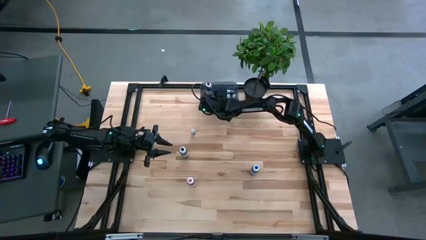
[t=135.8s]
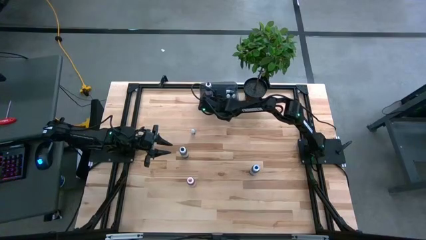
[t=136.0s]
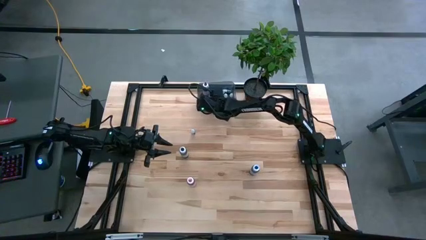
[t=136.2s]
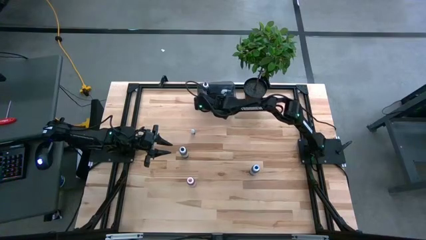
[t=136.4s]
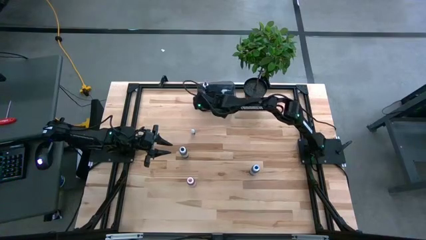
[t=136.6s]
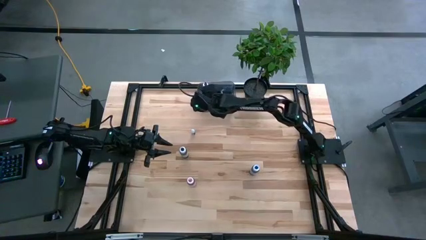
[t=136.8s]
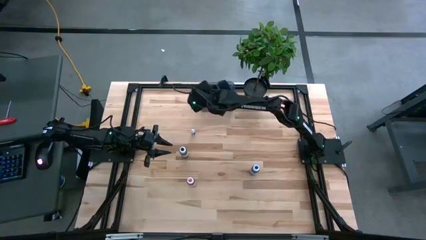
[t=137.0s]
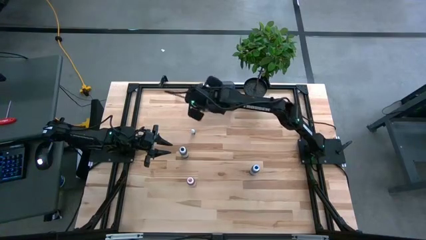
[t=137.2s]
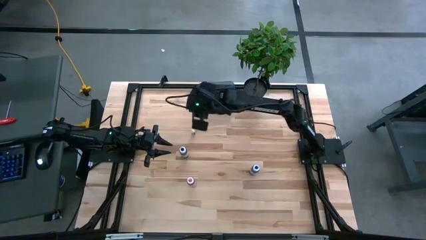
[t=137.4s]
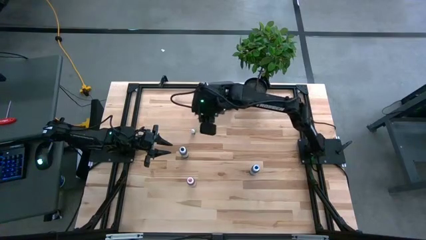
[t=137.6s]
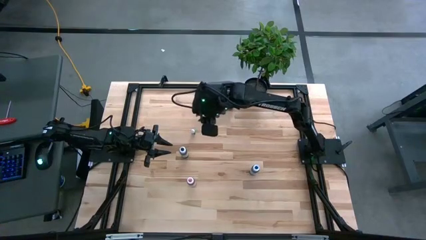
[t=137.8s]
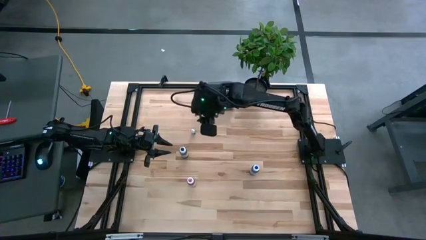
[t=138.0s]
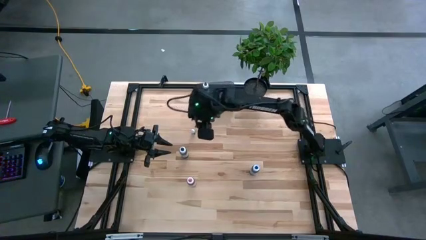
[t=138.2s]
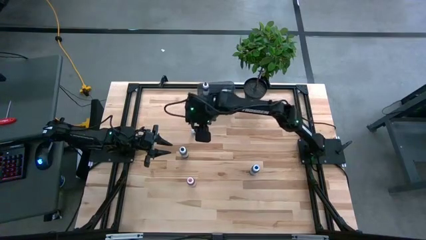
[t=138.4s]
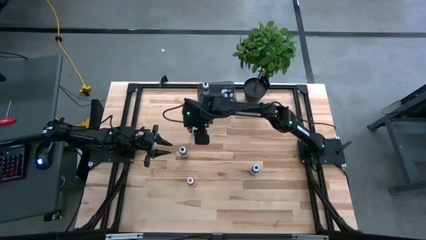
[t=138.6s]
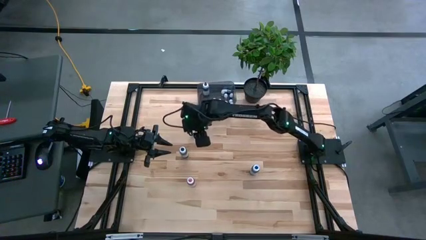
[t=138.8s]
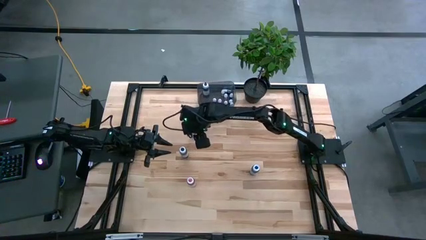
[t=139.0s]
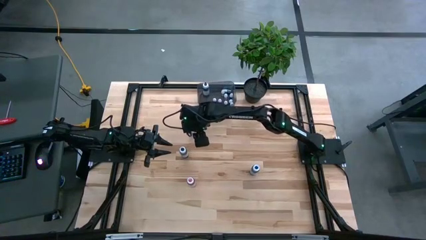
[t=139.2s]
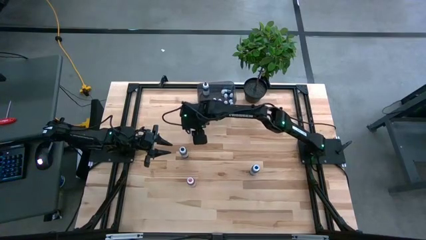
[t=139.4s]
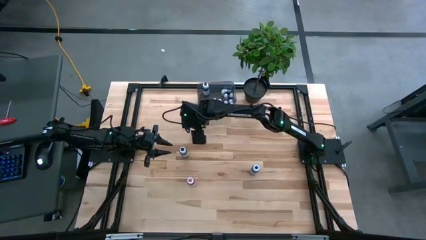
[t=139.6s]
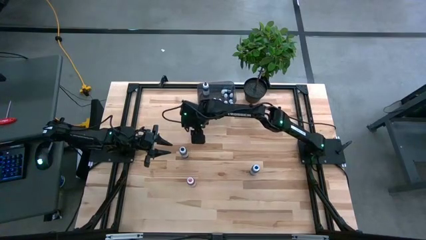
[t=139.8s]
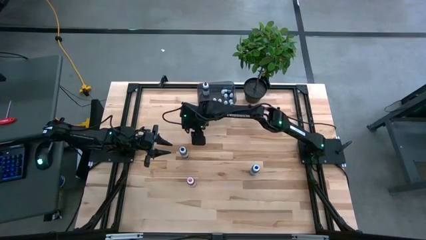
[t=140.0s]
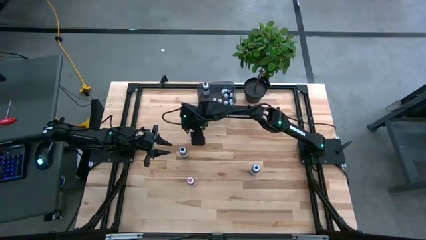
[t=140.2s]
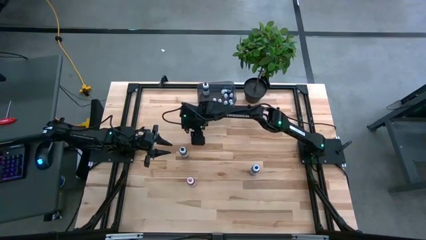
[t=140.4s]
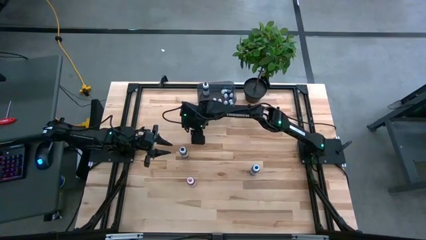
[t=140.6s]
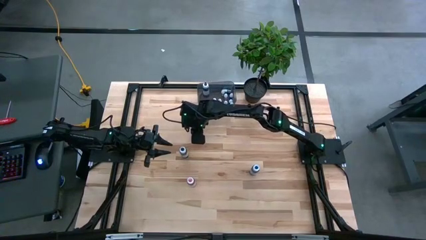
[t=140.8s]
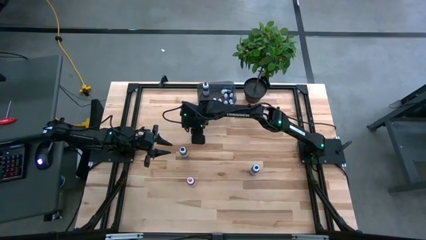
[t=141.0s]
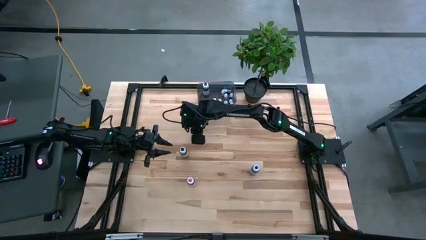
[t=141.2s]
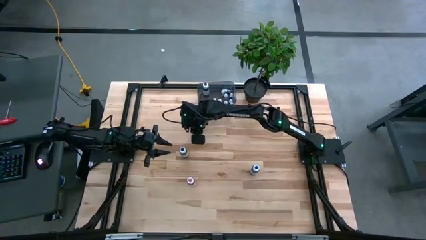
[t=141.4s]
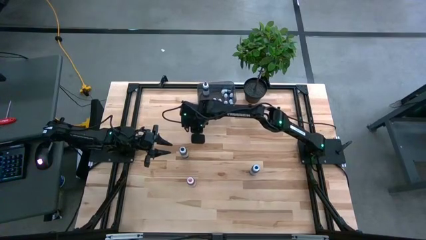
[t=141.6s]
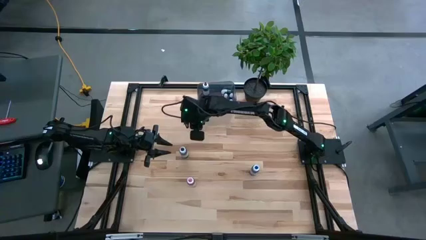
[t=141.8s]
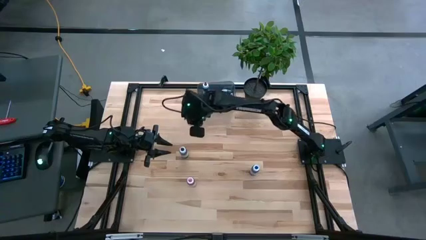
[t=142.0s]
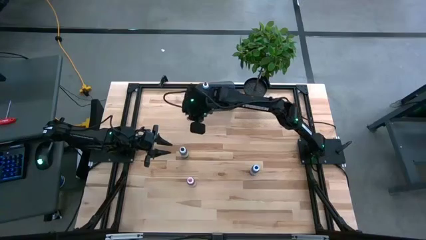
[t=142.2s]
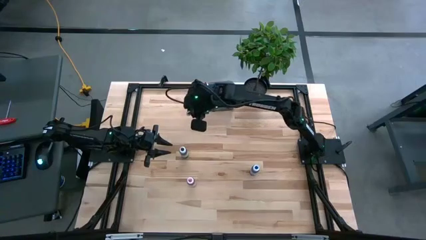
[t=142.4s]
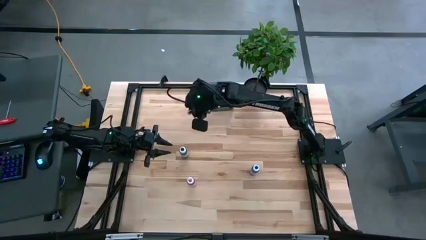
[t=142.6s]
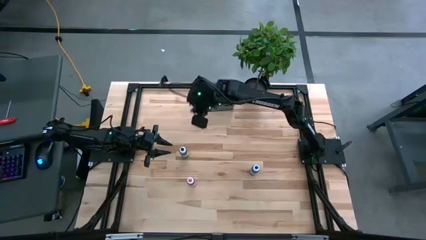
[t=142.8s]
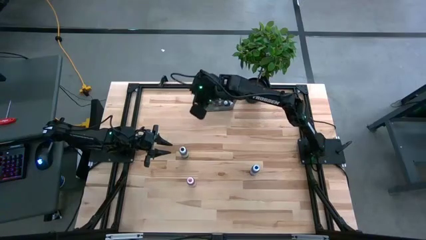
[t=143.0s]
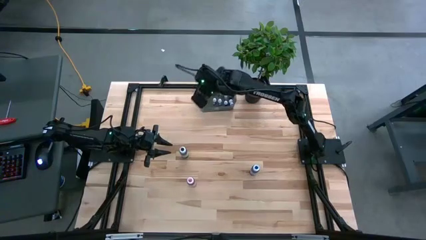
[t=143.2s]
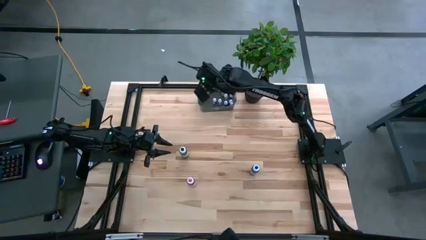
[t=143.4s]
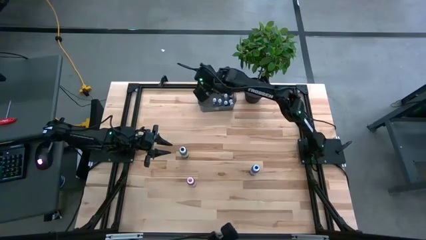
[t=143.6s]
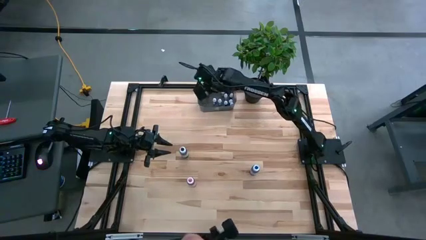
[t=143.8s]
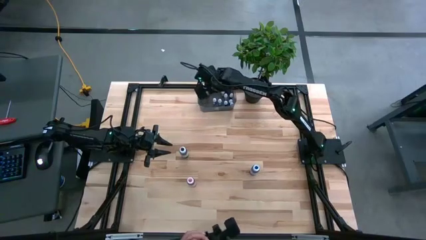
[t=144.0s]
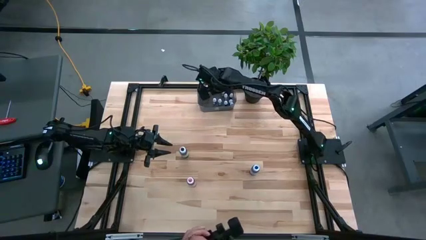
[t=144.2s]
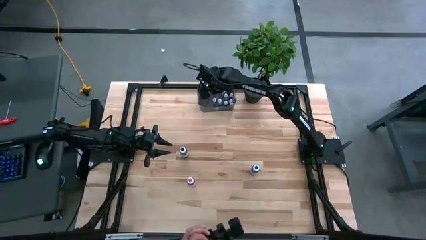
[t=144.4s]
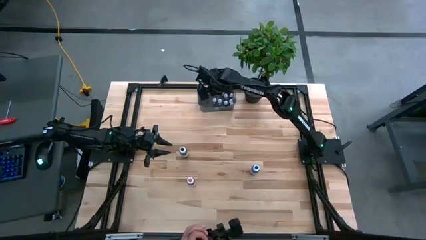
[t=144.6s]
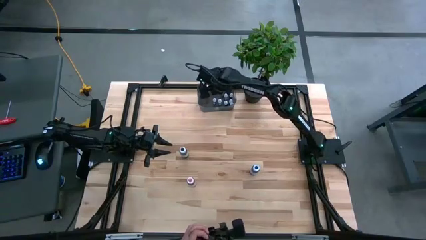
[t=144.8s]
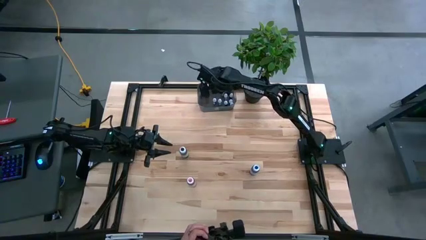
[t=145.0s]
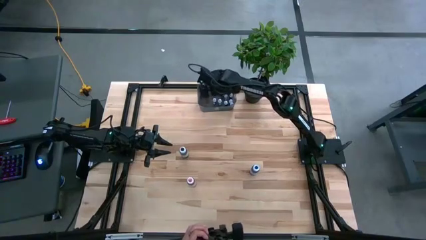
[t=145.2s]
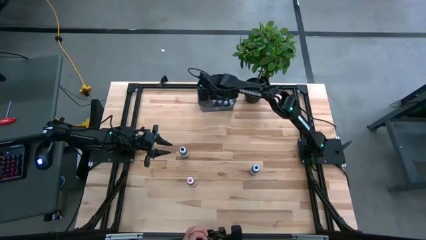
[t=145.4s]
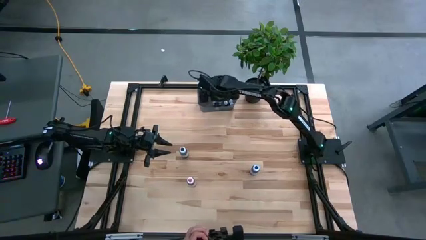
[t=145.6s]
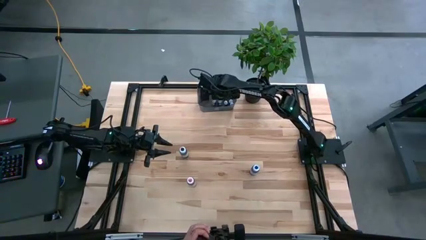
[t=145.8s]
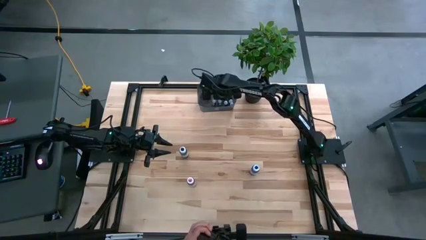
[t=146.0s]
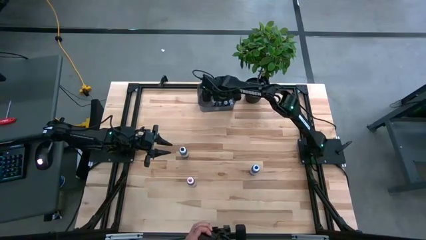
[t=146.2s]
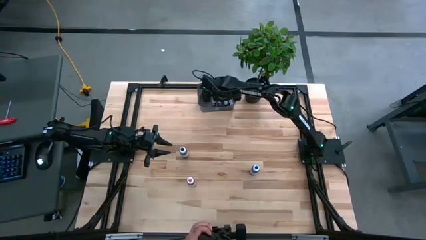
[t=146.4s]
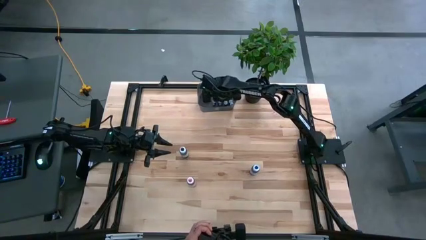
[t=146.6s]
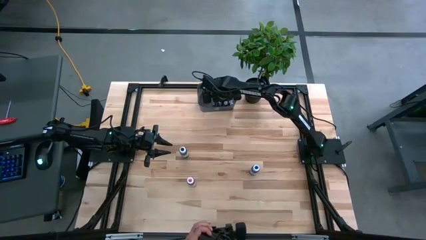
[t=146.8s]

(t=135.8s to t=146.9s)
Task: Pick & Place food coloring
Put the small black food coloring bottle into the black bin

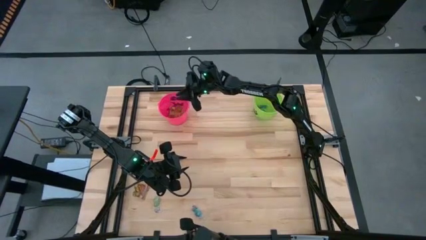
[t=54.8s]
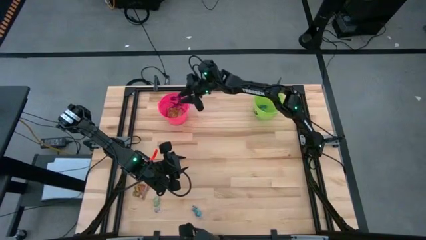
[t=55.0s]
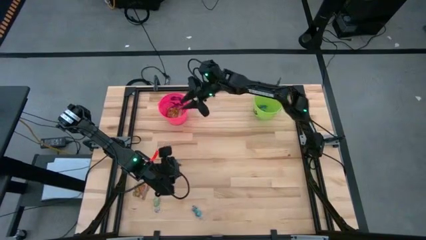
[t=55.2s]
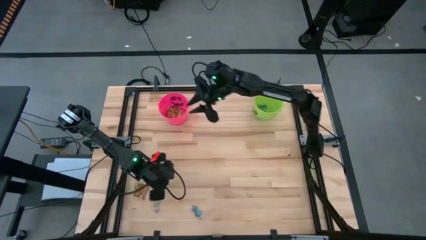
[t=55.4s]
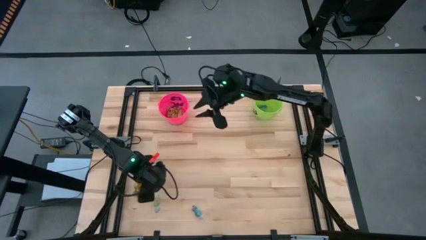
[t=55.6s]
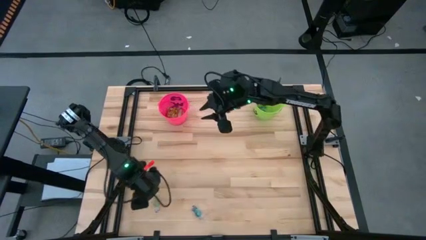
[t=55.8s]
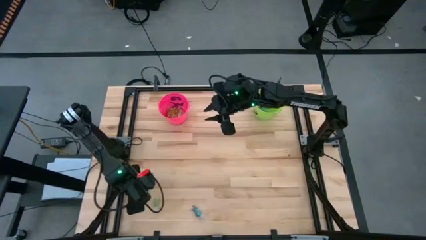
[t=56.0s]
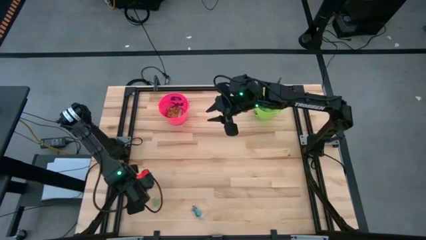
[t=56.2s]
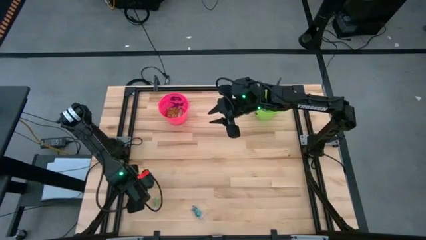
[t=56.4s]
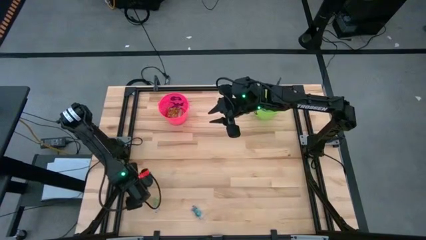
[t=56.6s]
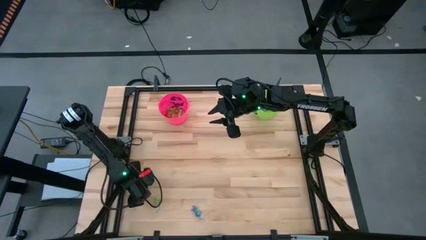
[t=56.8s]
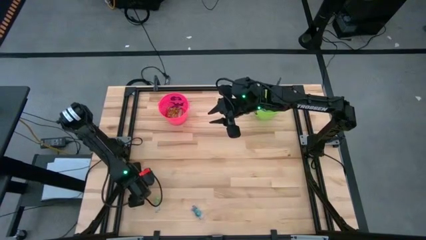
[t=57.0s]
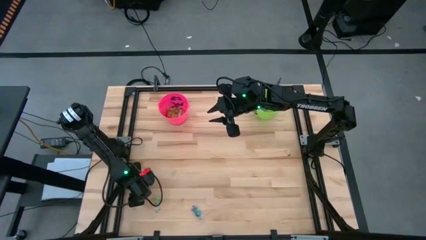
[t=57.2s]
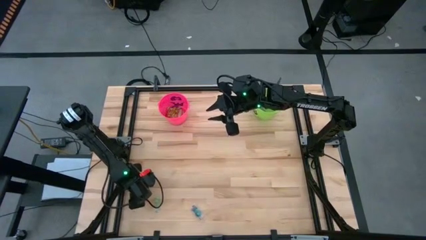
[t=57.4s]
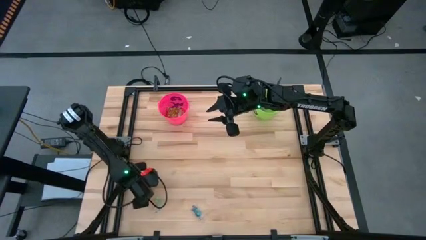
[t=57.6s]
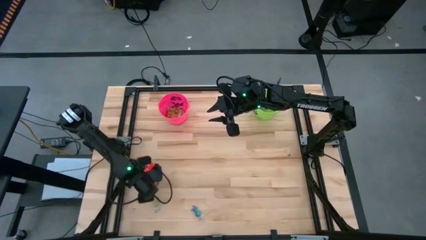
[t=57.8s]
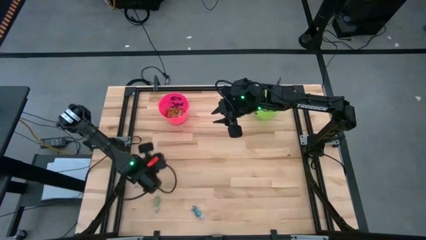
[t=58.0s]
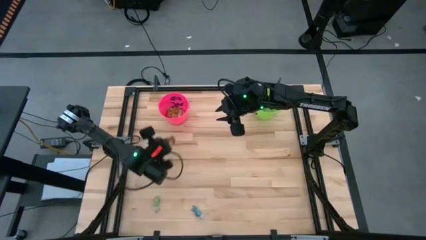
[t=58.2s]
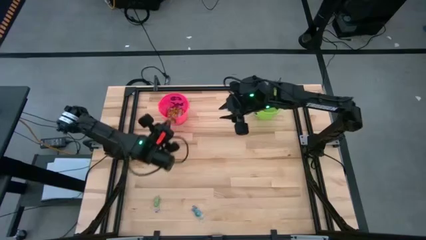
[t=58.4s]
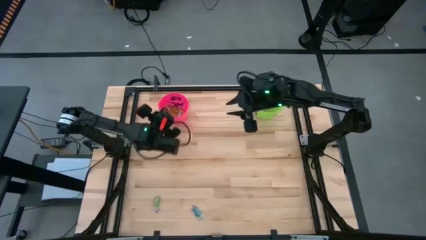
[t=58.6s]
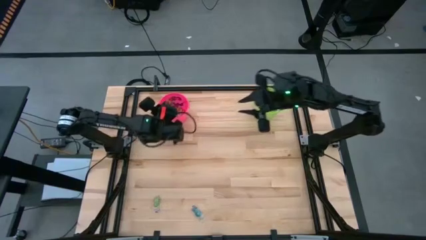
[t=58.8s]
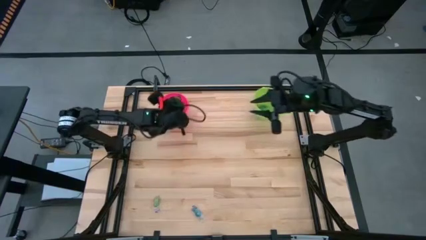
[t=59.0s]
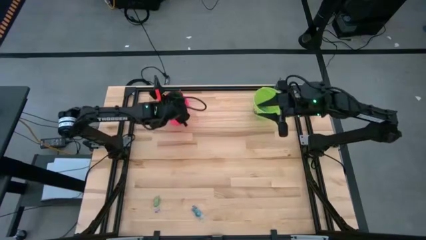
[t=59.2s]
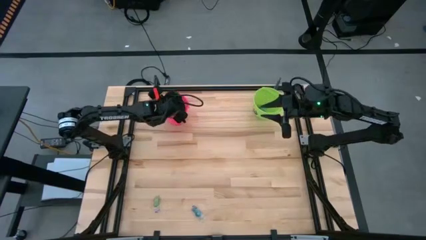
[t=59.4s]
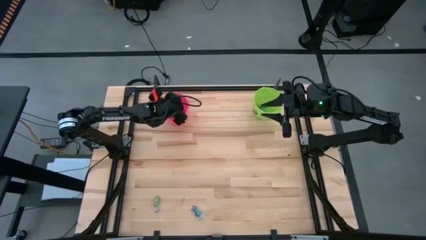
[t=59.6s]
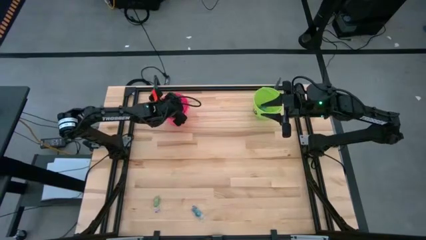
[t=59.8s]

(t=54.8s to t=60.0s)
Task: Sort candy by brand, put in halloween buckets
Put the gold red candy into the pink bucket
